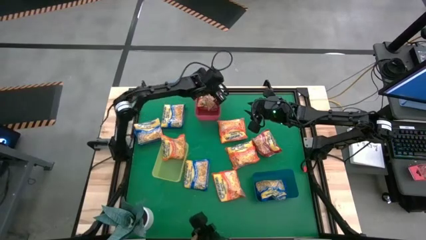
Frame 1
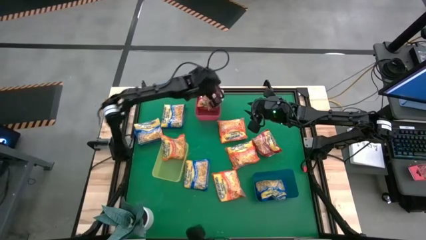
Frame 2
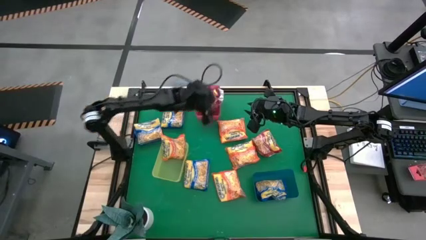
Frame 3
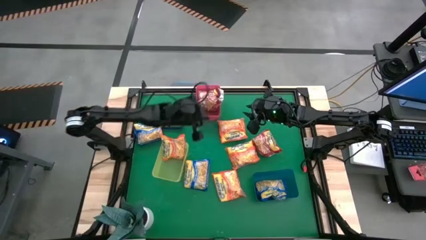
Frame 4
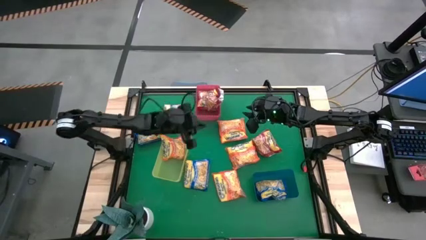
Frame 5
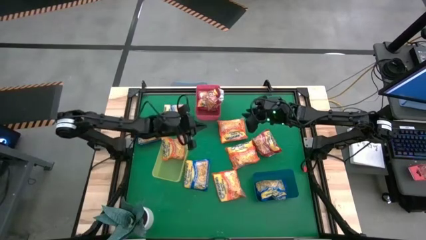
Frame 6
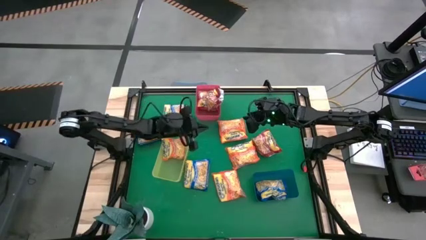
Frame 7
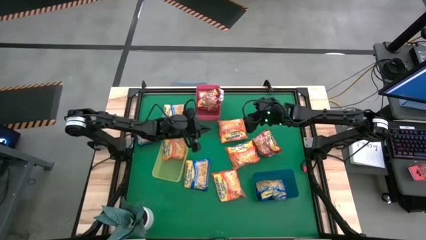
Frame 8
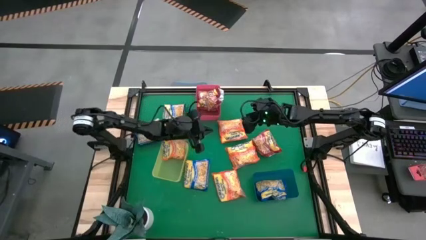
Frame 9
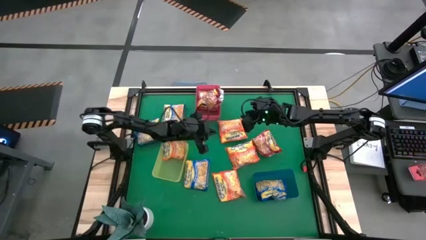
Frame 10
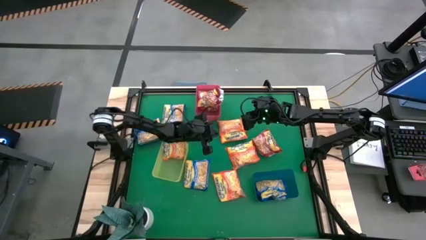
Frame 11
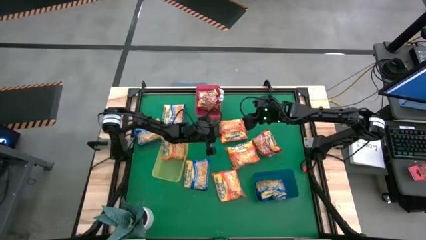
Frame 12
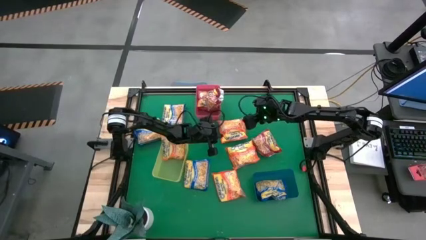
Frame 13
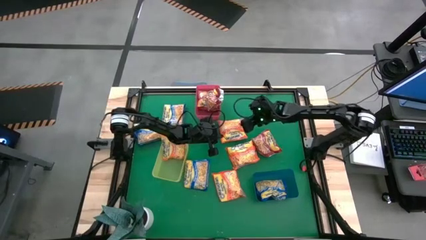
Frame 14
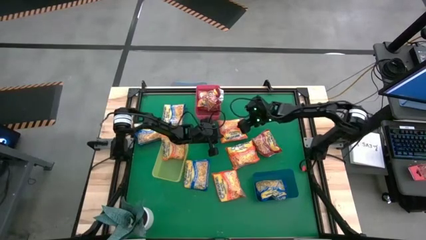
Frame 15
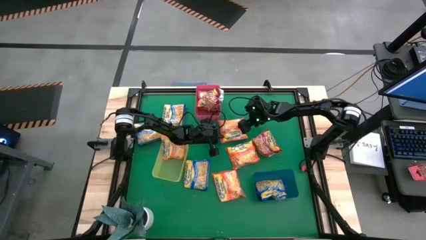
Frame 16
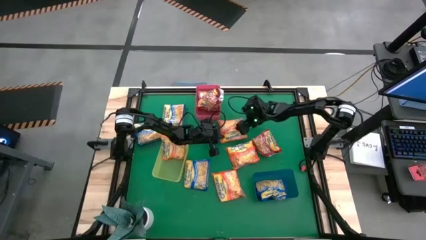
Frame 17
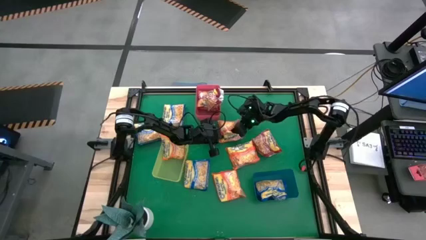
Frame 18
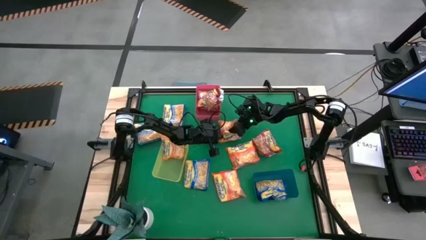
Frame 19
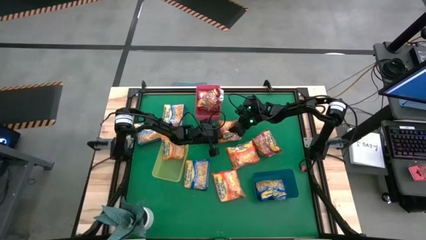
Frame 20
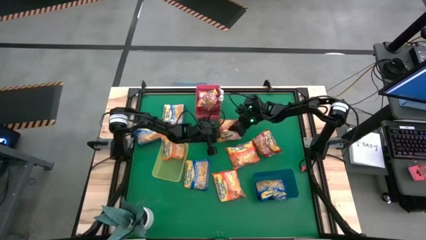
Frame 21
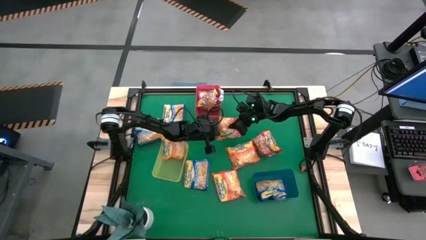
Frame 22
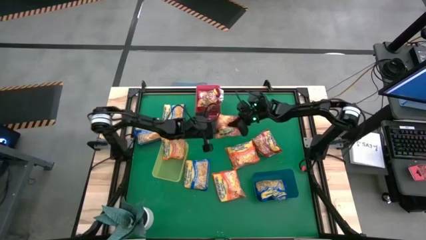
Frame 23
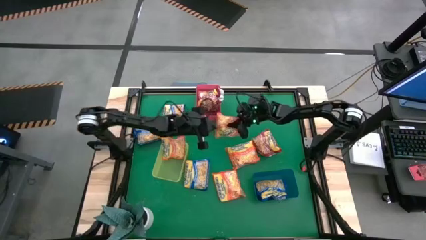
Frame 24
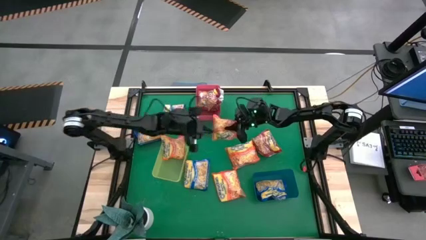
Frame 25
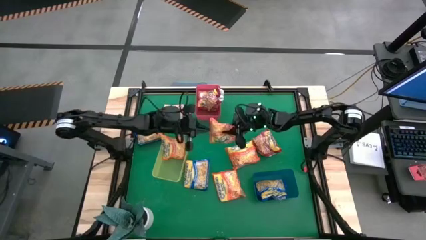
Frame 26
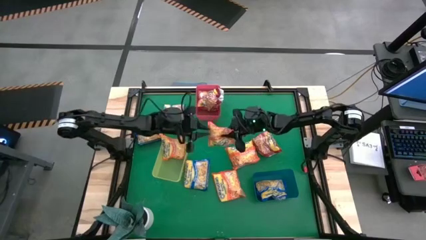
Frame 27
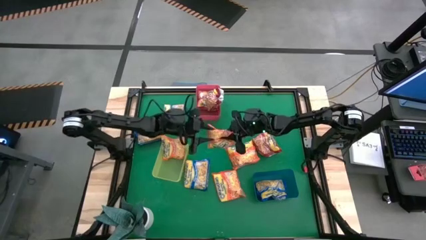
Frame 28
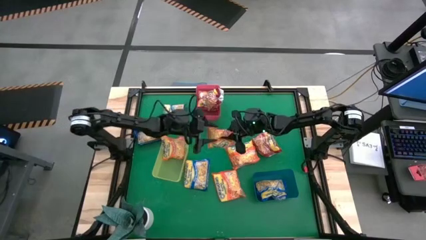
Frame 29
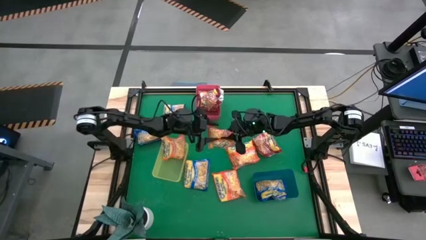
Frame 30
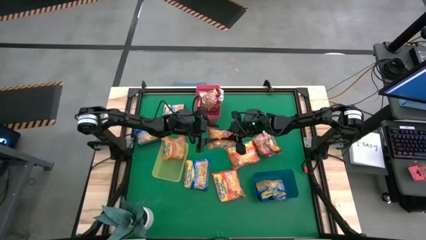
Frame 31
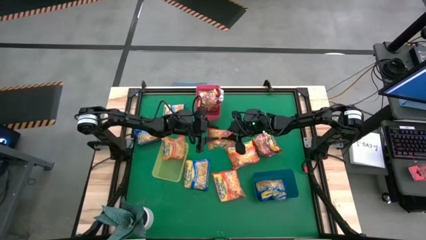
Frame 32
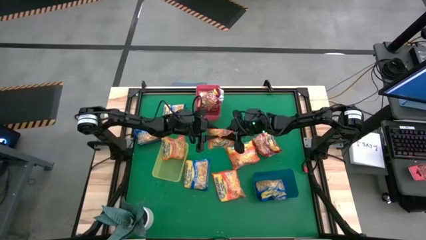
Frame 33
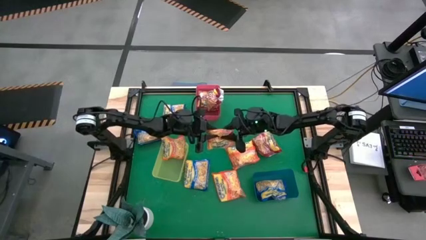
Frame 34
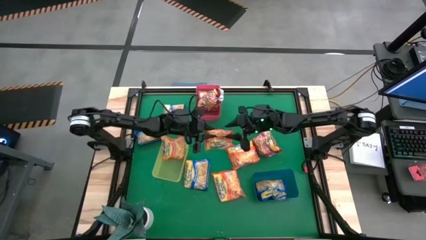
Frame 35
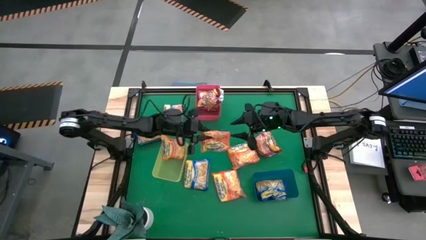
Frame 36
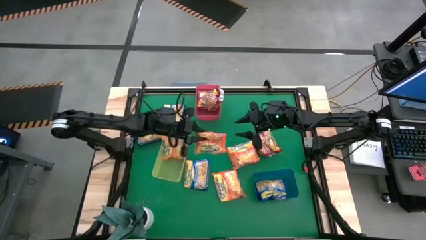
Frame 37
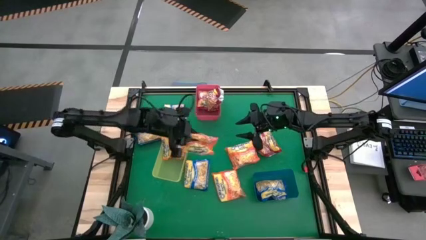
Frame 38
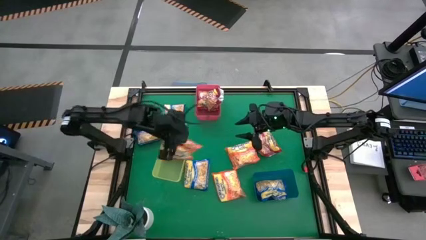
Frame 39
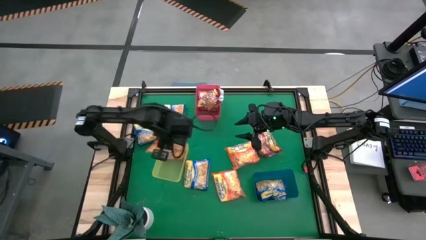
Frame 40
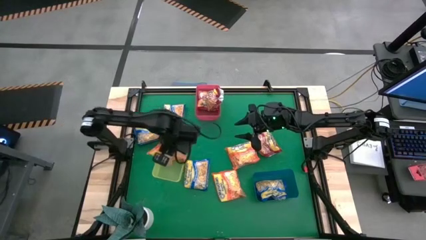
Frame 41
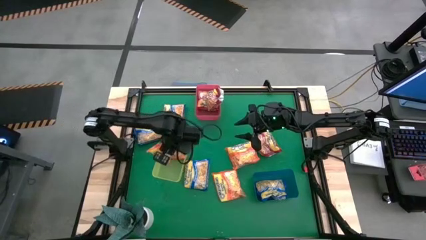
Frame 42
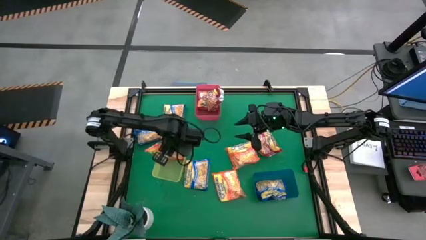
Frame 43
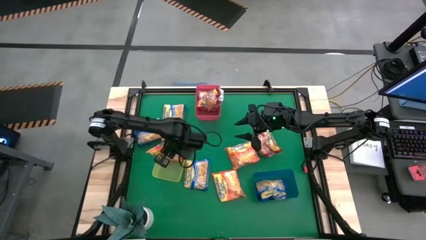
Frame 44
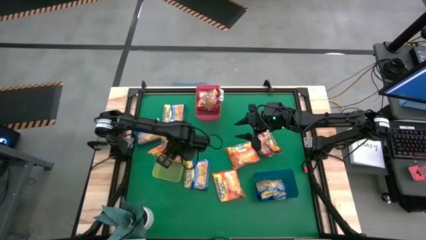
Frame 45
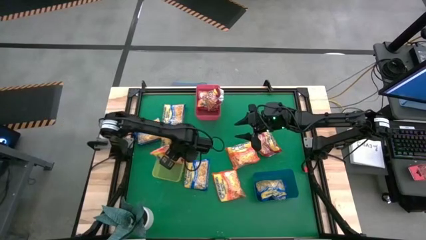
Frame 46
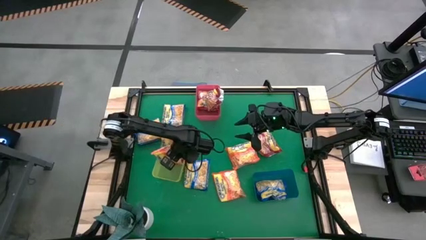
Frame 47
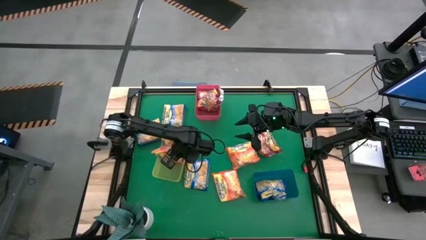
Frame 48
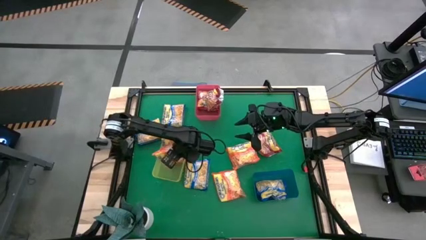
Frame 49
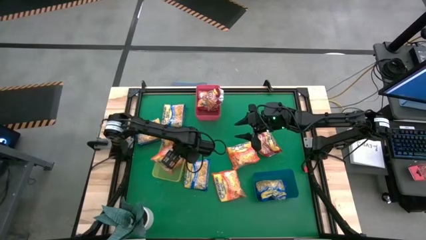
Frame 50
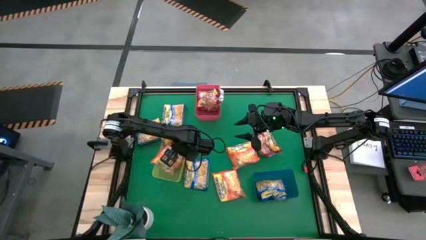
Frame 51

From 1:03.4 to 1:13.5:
Task: Sort Maruchan noodles
Put the orange noodle pack into the yellow bin

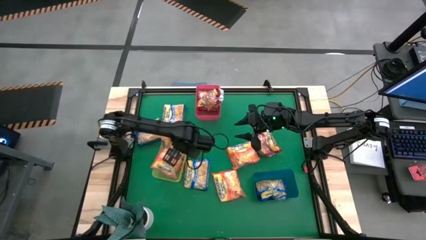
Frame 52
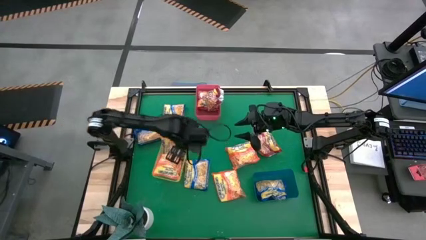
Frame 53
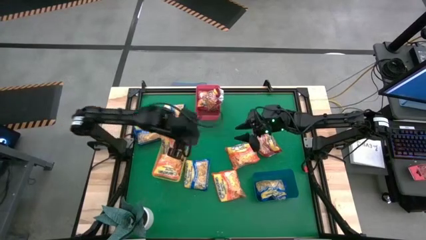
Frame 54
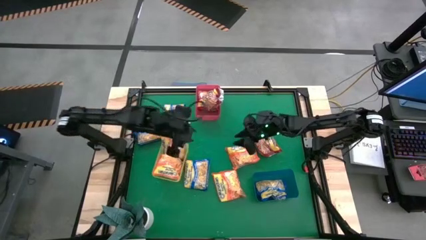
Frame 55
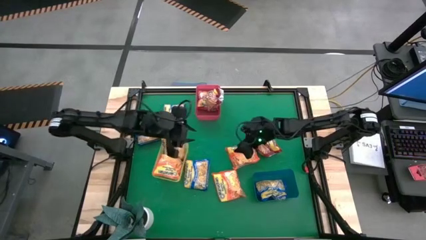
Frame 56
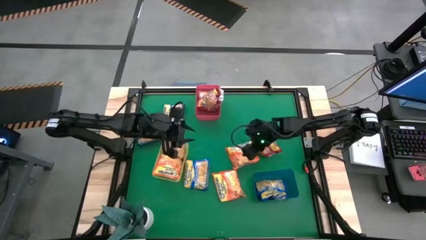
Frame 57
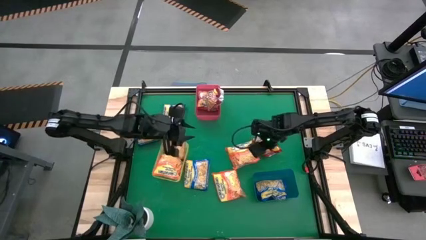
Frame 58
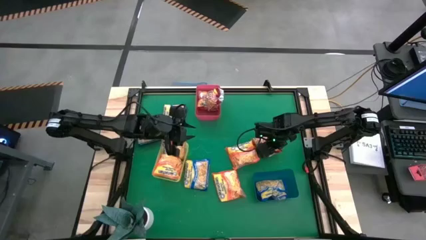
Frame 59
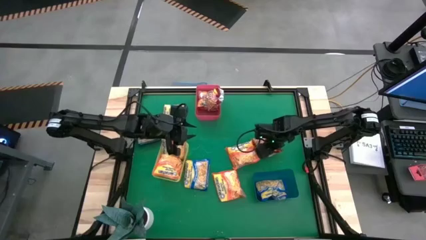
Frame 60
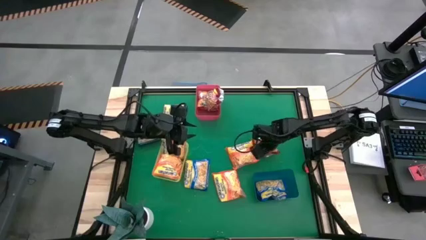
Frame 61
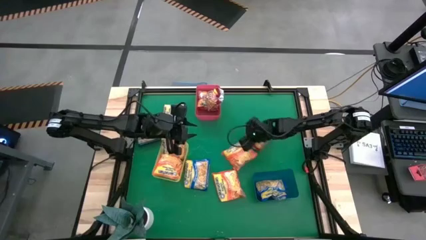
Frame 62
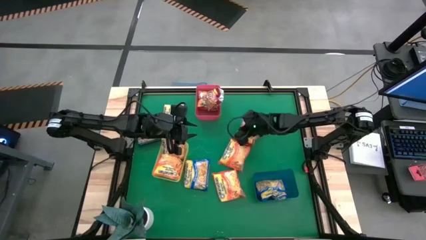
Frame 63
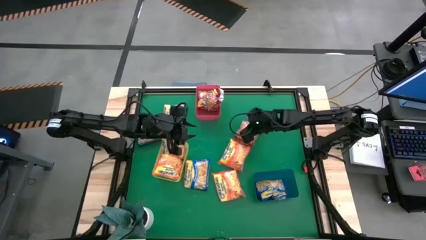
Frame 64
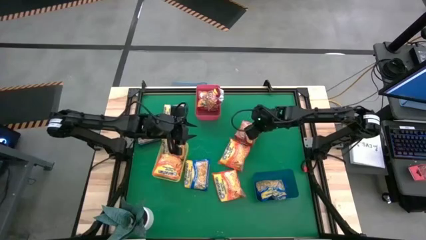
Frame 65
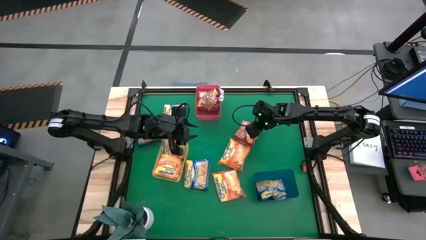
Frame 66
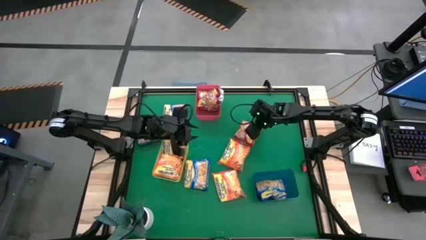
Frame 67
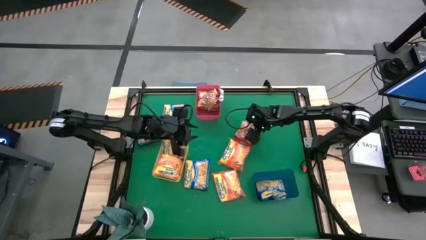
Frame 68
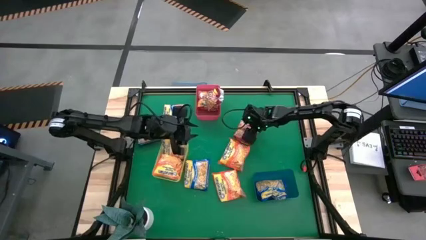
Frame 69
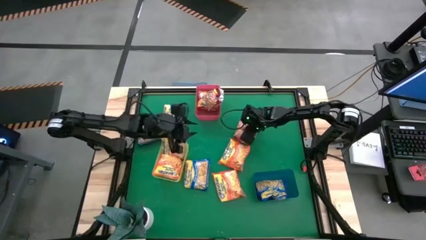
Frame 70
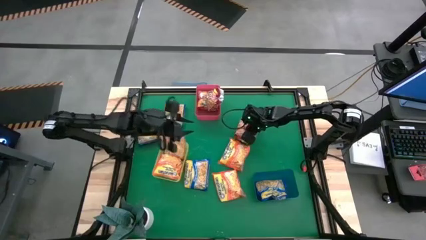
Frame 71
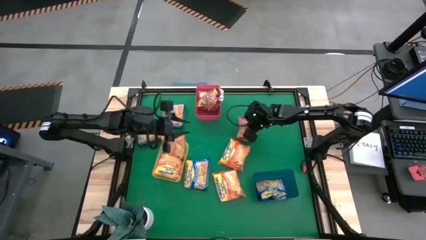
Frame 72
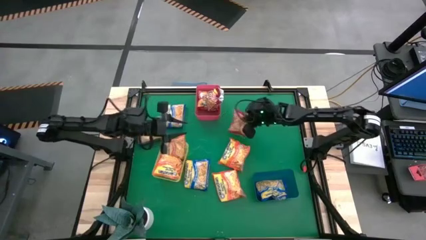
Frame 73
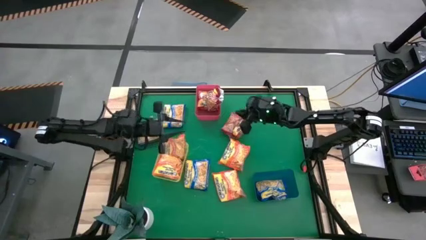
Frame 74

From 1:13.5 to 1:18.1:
Put the noodle pack into the red bin

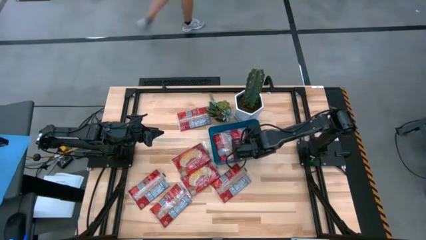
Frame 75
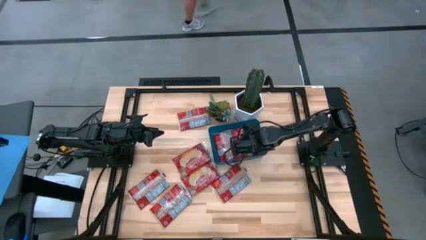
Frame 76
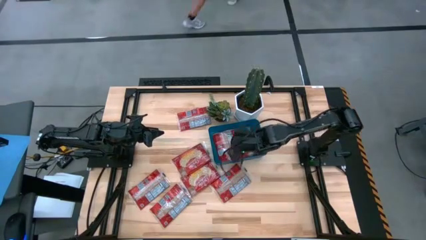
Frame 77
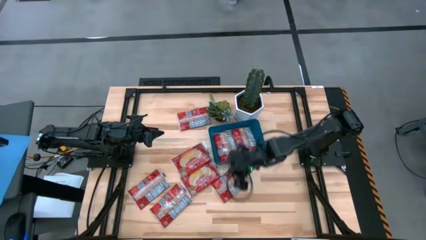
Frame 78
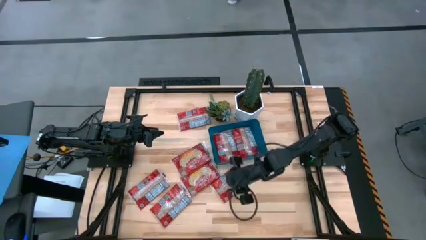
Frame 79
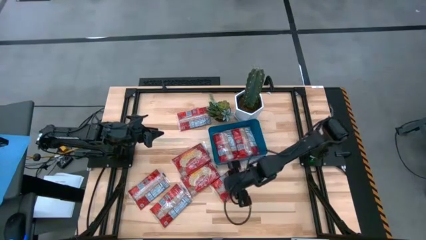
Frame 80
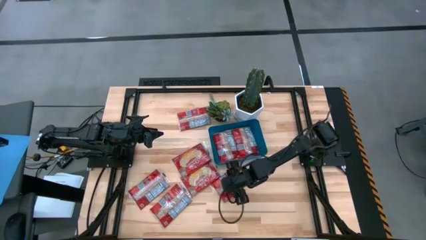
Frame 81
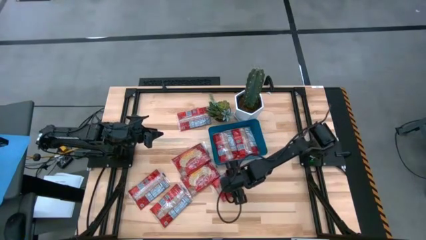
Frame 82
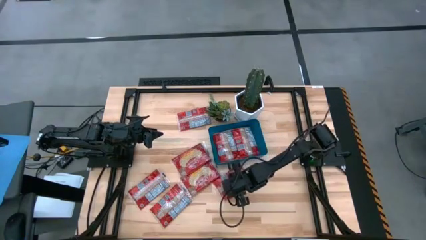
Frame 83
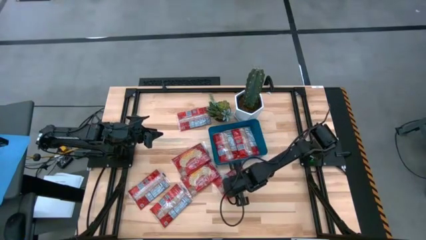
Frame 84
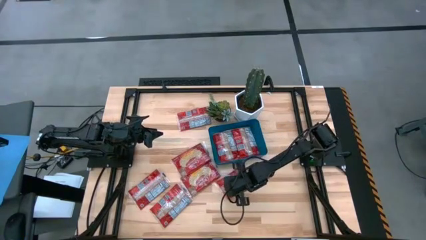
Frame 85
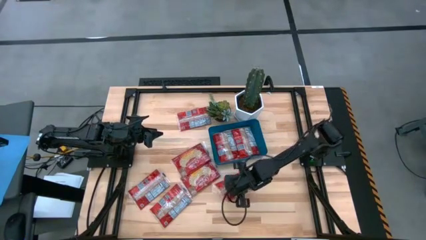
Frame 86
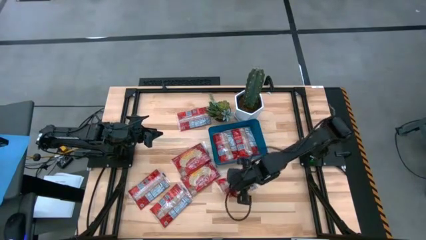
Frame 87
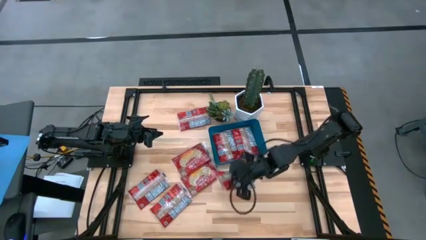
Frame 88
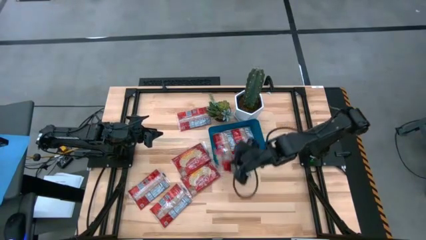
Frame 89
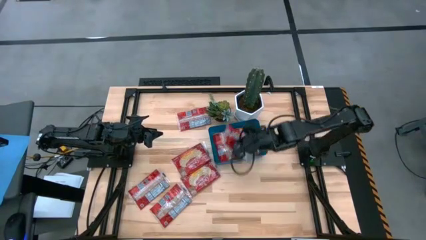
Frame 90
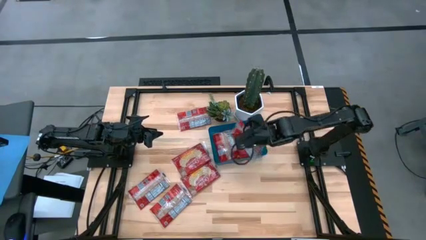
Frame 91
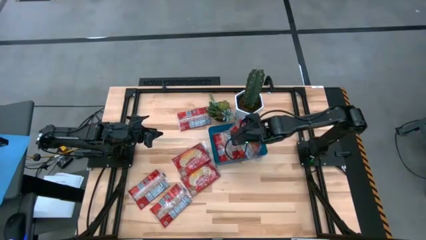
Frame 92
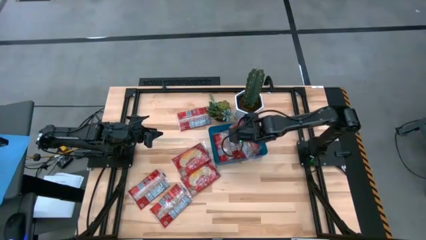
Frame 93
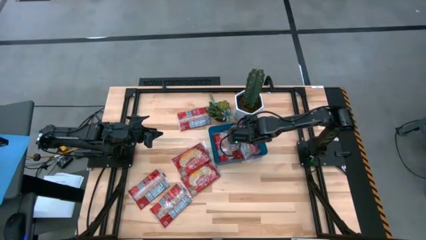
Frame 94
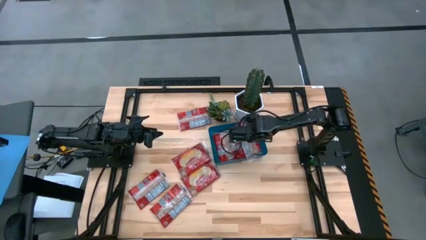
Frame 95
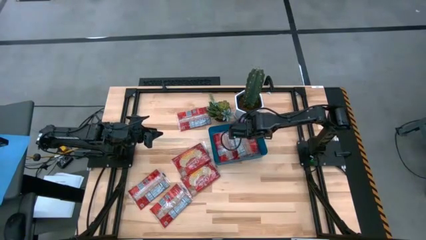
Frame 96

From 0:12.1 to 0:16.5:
Task: Sort popcorn bags into baskets
Put the red popcorn bag into the blue container
